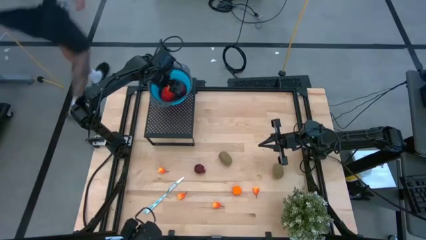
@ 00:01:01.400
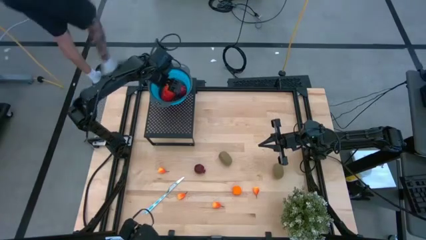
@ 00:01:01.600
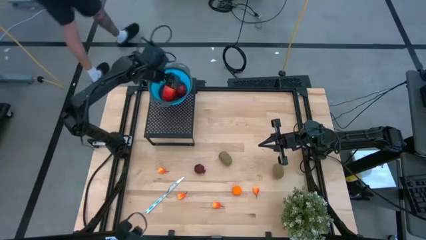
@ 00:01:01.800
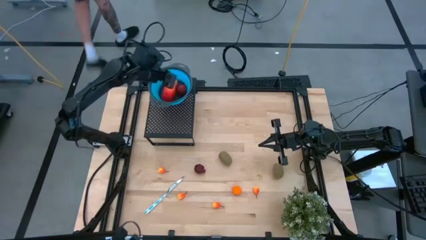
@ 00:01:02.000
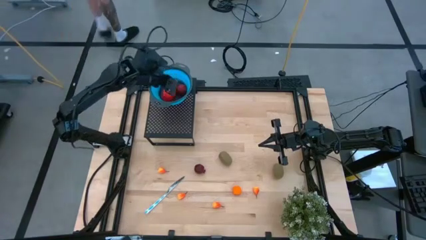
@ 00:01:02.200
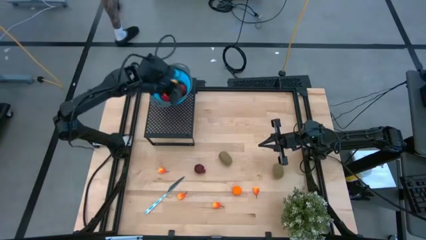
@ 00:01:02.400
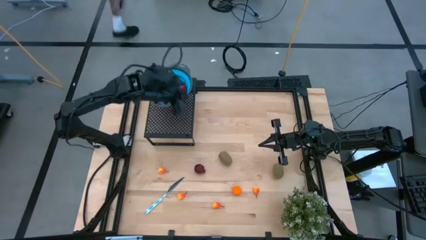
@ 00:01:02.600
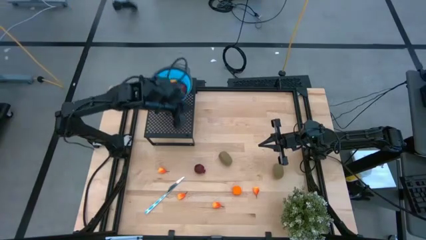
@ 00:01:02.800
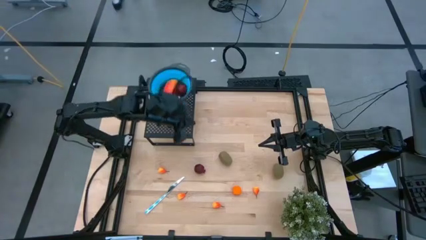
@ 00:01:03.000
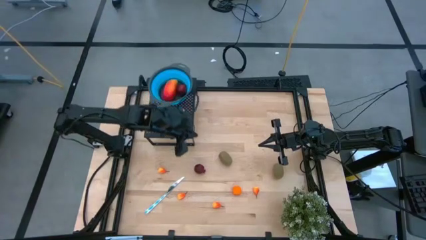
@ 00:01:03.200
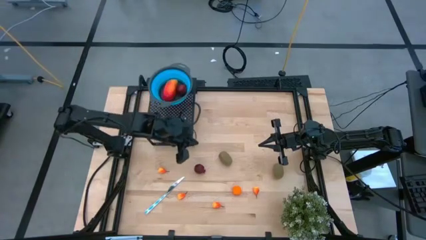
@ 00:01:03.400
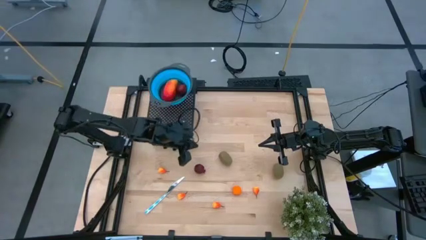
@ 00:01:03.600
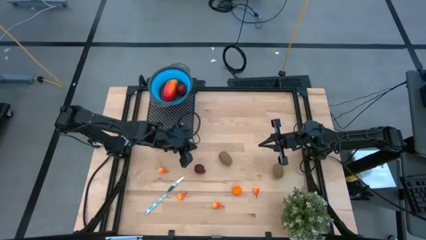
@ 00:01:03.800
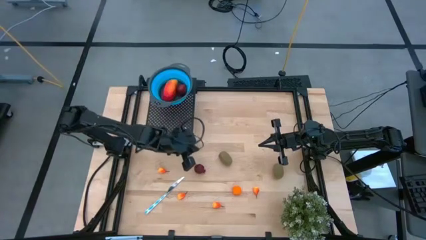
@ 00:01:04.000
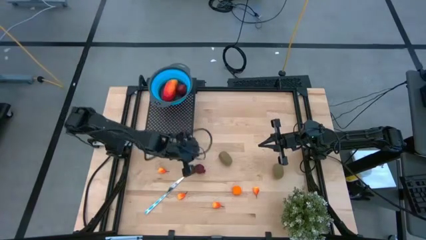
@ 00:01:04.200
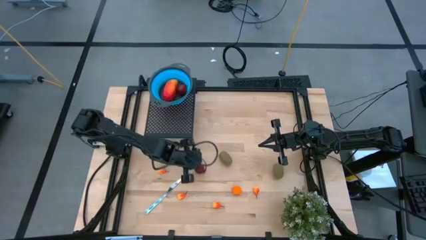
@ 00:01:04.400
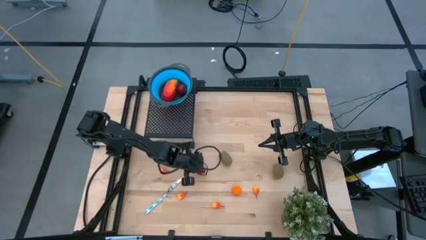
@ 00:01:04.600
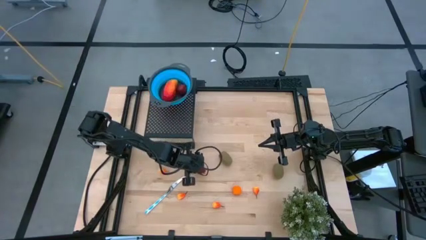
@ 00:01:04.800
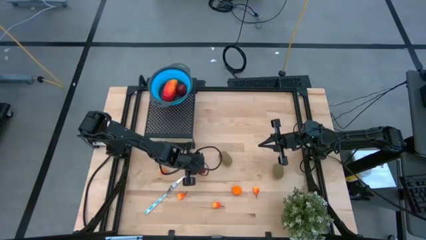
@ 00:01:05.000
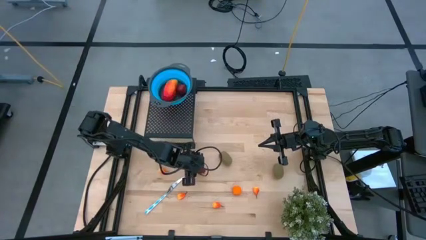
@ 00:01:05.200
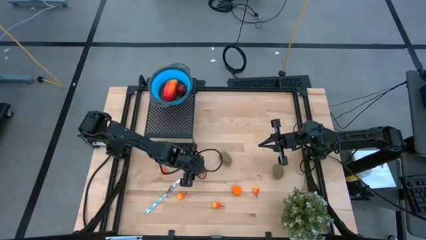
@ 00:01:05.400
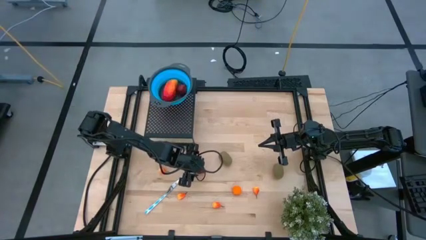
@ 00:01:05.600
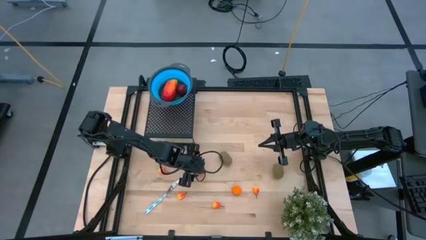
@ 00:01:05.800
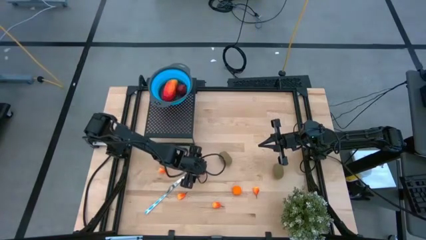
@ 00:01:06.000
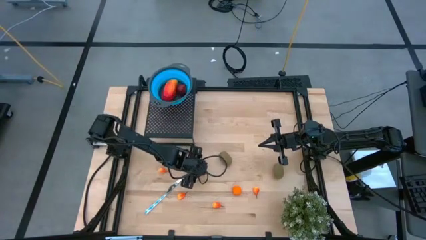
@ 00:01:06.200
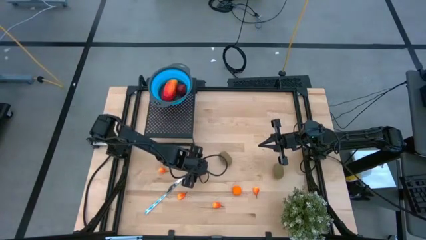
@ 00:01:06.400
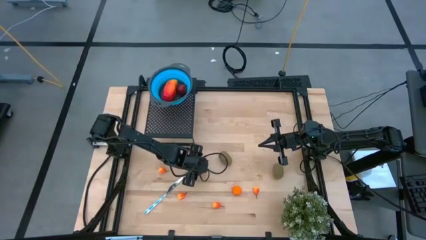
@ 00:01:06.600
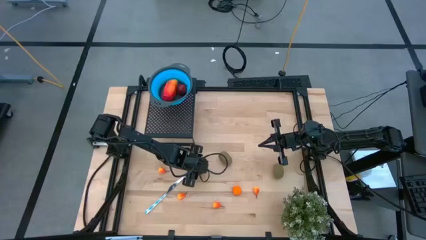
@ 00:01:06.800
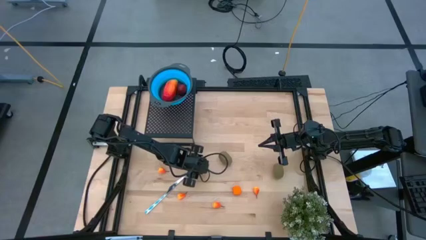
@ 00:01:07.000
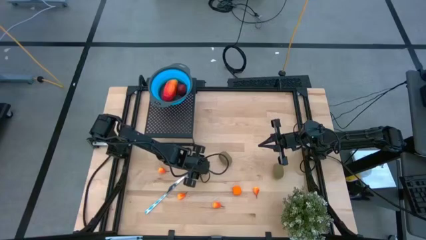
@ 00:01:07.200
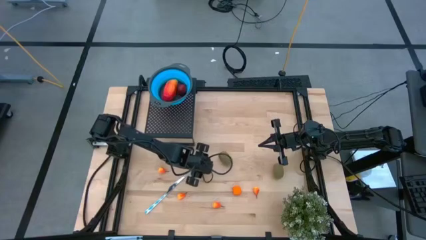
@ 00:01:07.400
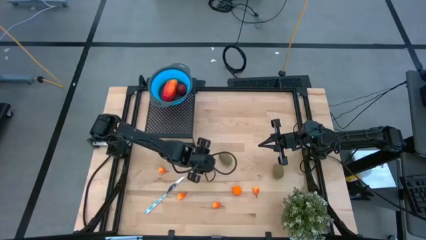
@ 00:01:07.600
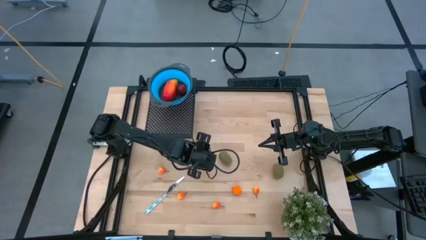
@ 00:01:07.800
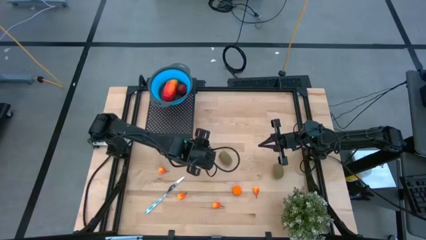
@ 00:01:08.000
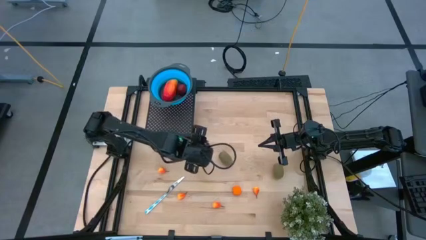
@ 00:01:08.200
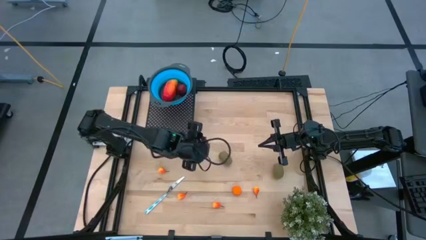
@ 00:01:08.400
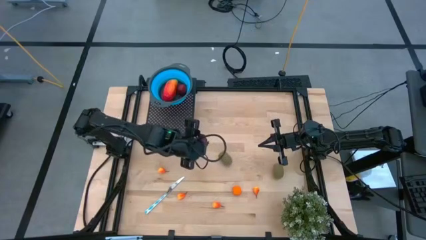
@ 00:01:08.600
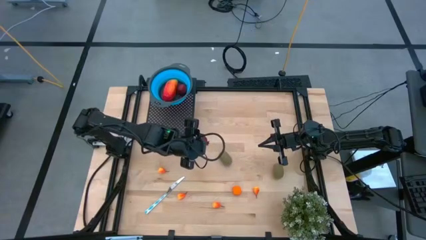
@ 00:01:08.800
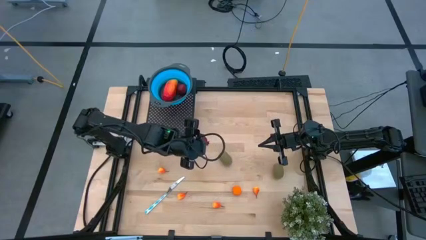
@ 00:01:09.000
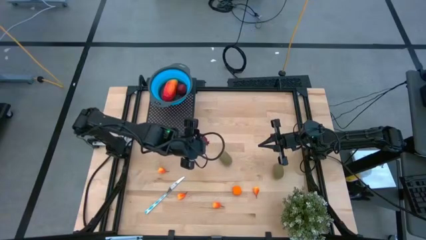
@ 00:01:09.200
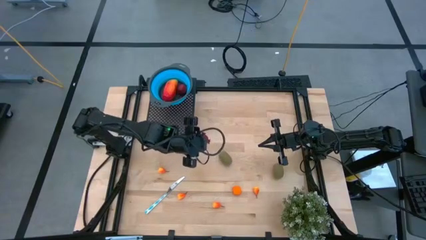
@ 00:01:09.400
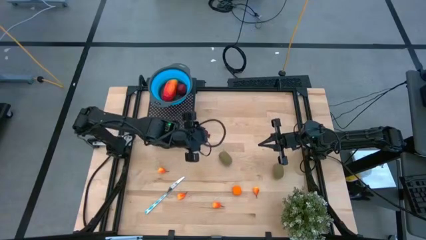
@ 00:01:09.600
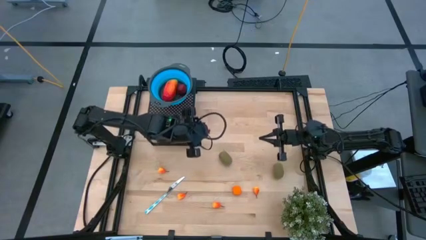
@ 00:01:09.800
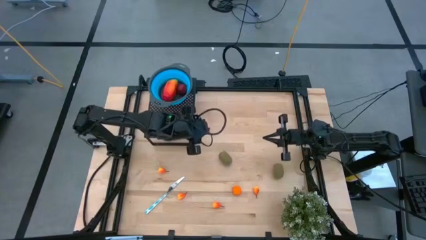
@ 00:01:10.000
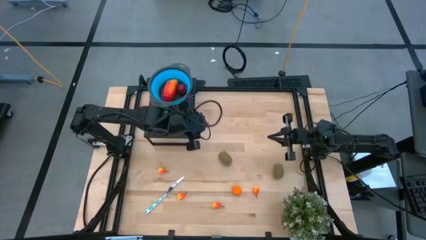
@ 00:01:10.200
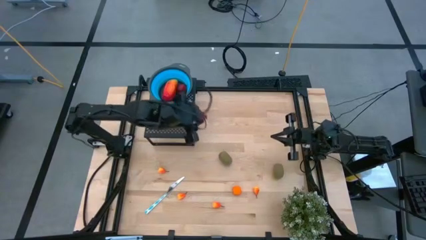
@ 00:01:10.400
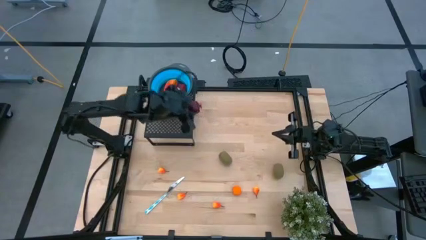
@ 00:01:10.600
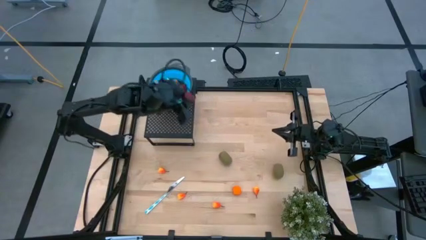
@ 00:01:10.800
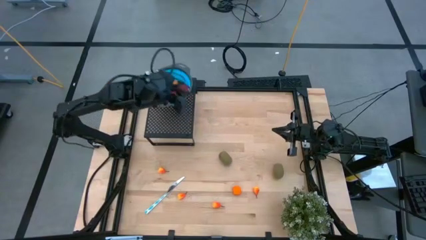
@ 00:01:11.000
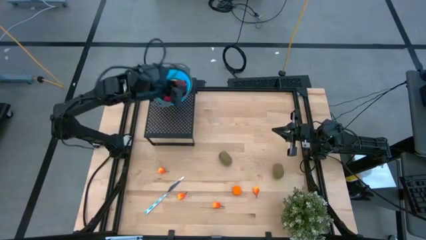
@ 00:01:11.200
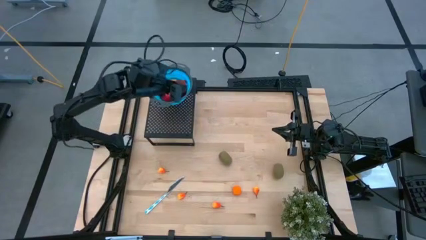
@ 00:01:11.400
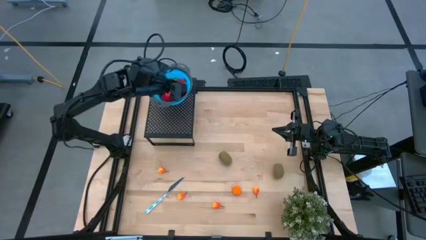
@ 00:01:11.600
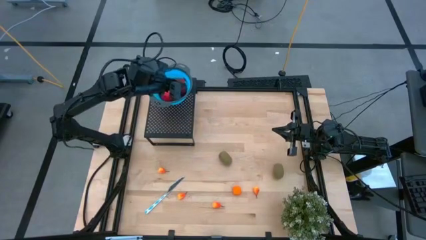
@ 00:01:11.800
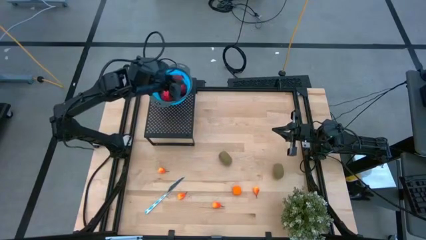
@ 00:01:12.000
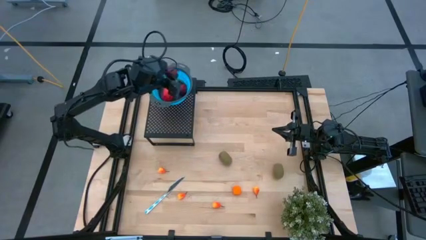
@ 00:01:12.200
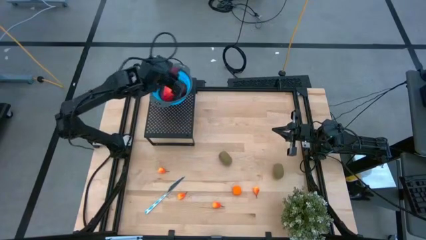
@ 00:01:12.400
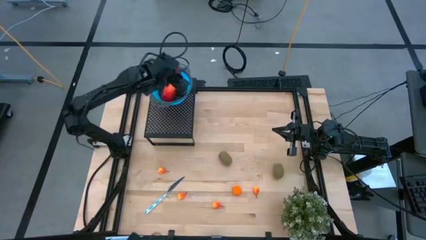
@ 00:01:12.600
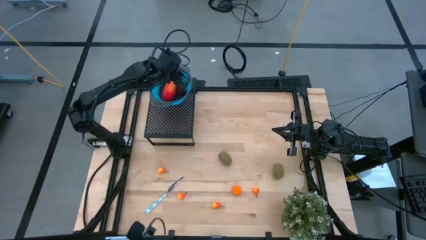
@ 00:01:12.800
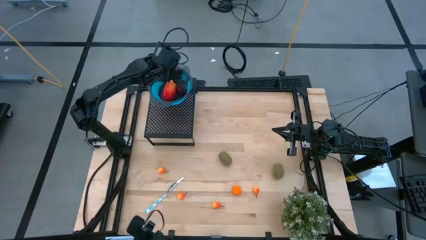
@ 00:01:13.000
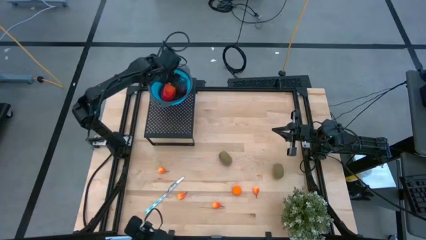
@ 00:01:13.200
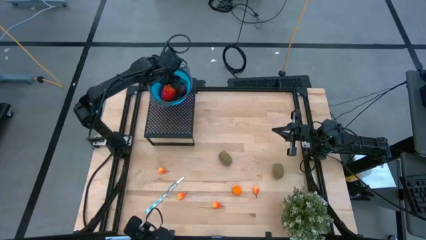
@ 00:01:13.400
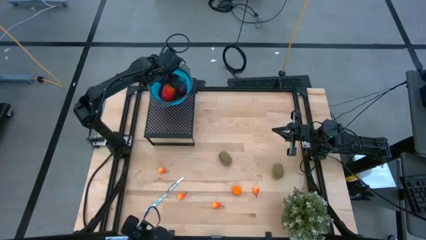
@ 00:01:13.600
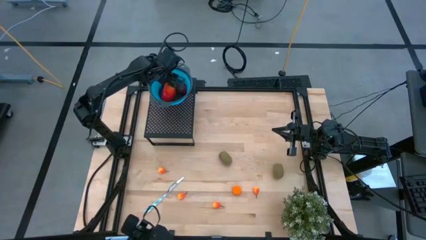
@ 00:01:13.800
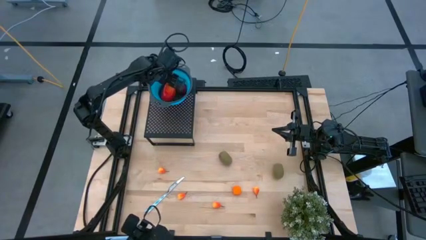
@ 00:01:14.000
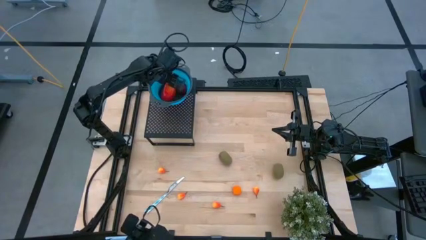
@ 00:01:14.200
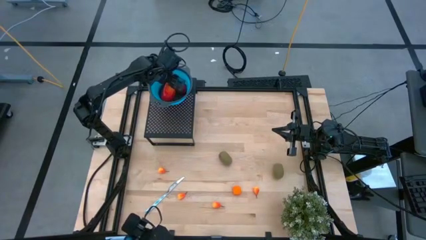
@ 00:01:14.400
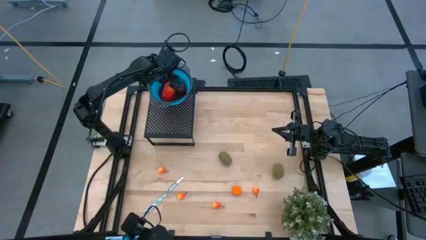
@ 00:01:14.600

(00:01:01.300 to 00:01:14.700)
Task: Pick & Place Fruit
Put the pomegranate into the blue strainer bowl on the shelf

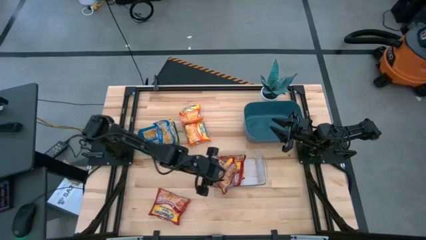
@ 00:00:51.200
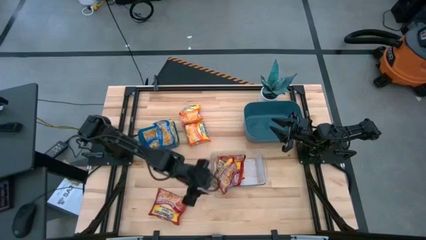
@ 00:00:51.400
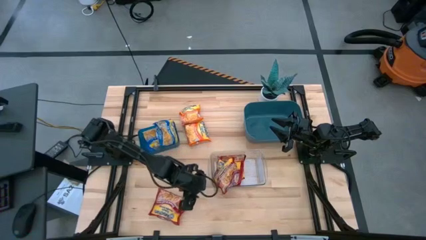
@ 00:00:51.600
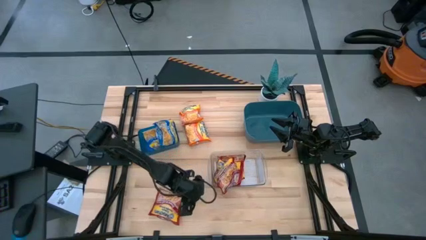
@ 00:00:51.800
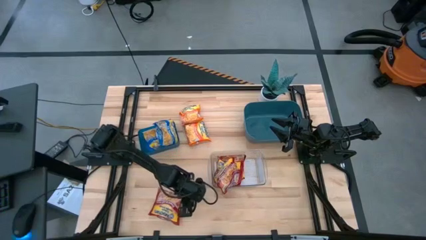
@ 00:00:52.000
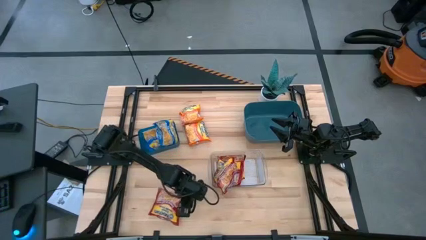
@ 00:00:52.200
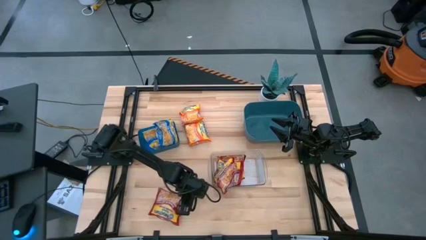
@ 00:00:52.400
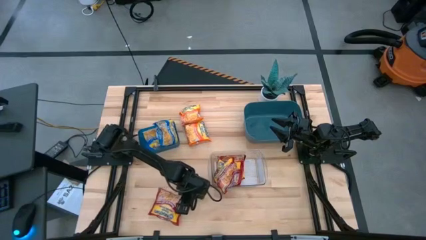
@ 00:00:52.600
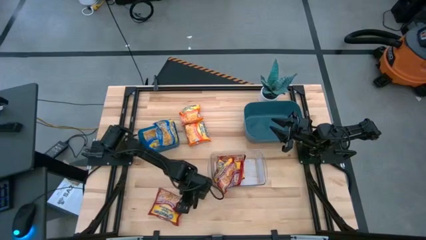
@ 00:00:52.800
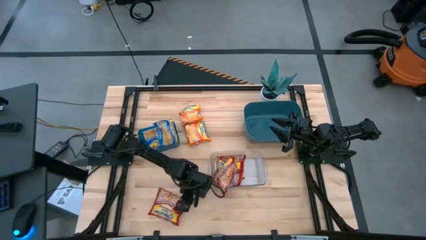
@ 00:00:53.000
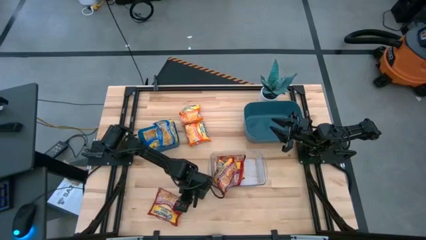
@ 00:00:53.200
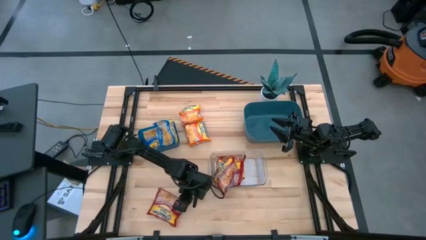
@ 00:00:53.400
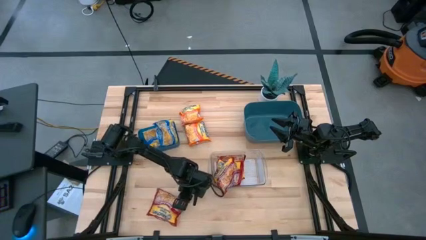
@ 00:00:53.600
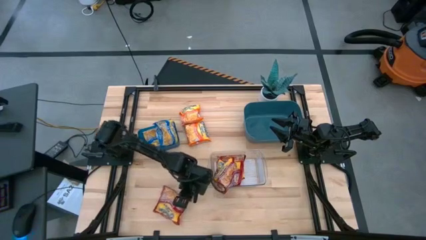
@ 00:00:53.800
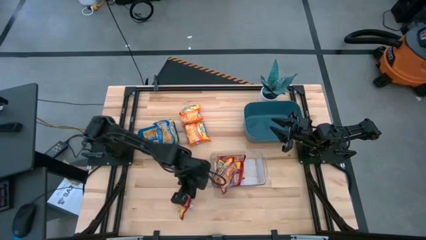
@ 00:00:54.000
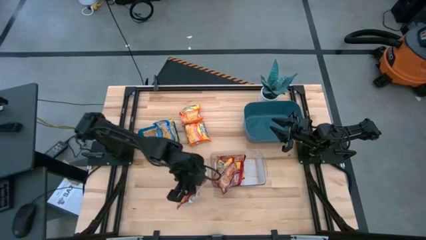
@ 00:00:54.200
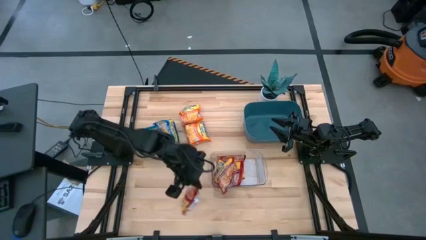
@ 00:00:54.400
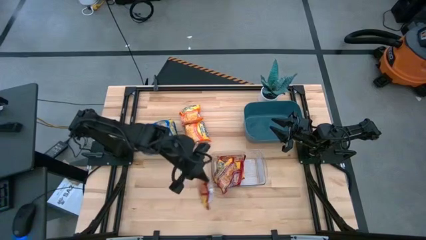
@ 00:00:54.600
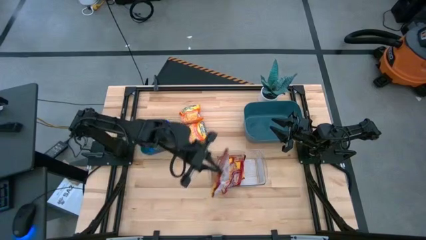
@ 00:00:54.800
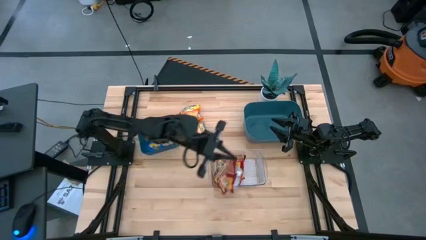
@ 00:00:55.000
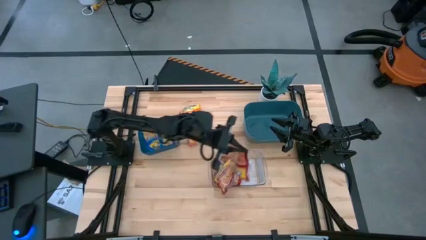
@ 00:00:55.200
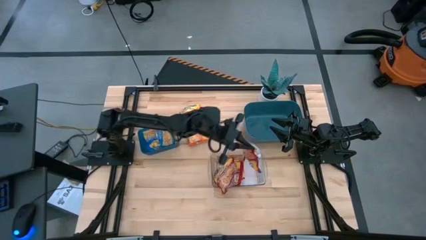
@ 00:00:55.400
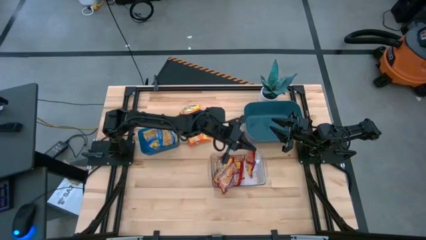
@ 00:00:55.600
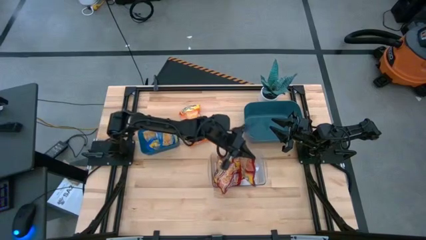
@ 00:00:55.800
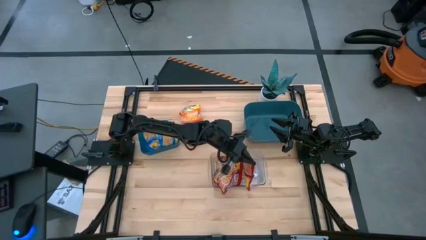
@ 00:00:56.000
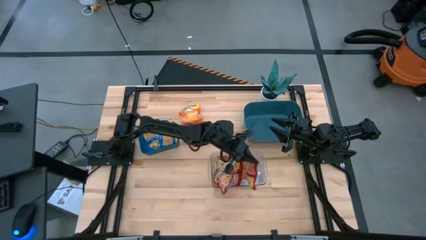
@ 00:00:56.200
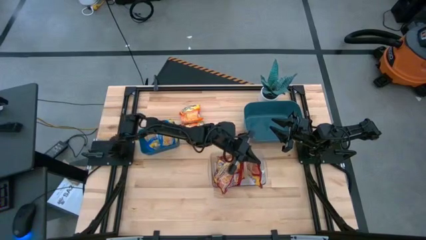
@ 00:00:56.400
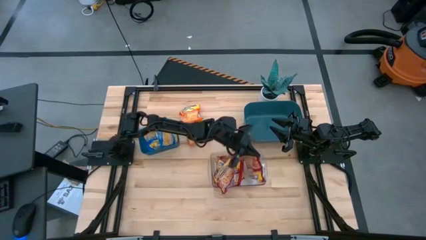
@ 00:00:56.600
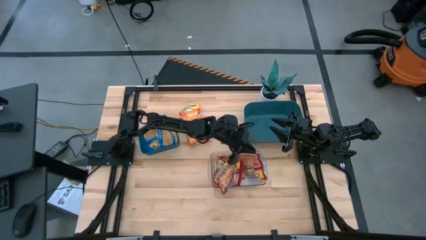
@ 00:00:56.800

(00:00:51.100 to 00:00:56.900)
Task: Sort Maruchan noodles
Put the red noodle pack into the transparent bin
